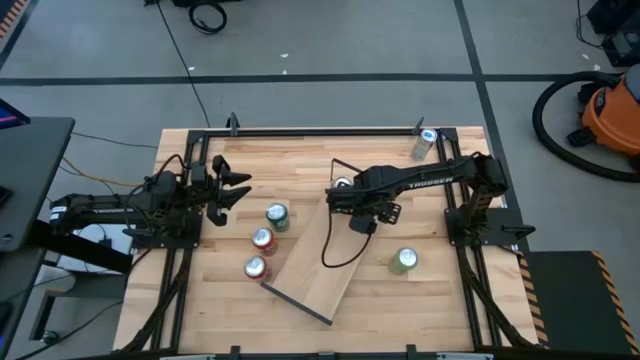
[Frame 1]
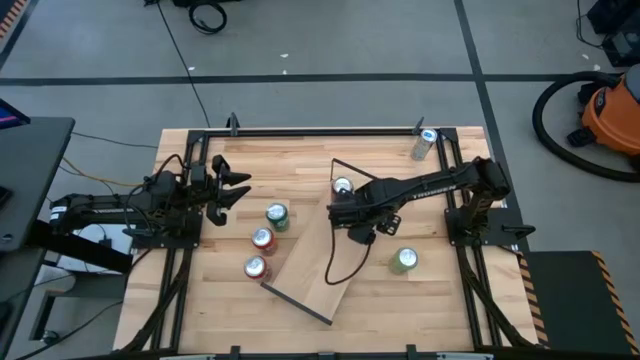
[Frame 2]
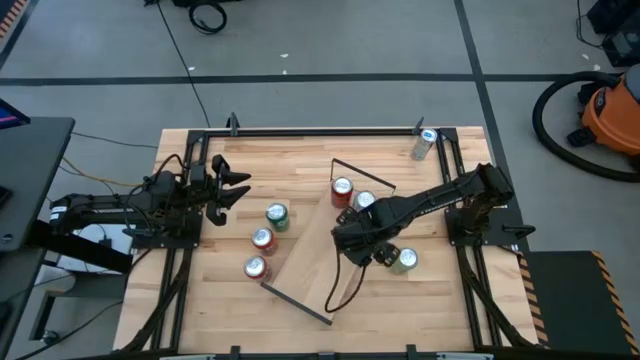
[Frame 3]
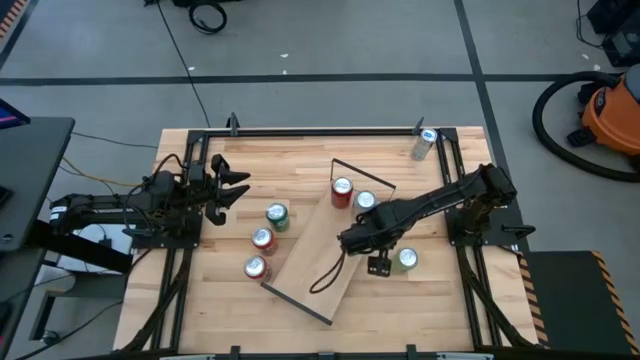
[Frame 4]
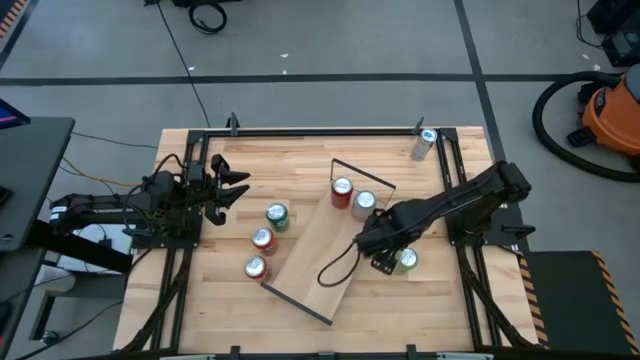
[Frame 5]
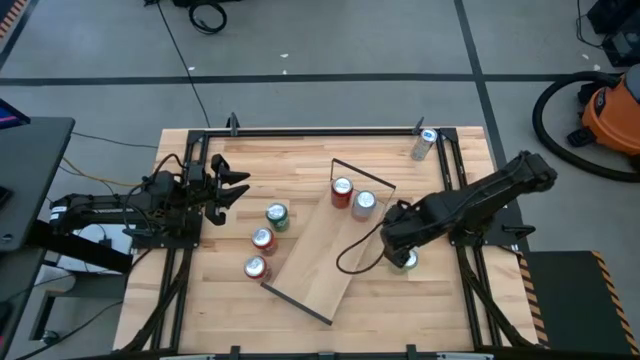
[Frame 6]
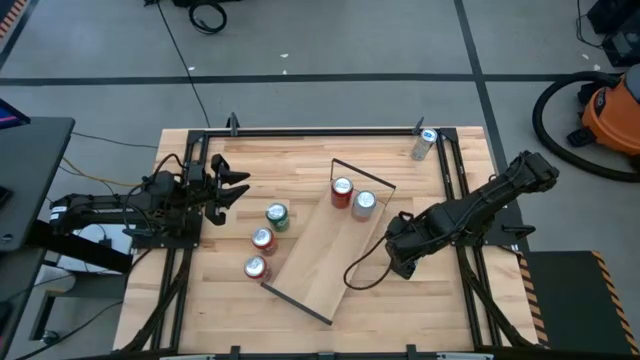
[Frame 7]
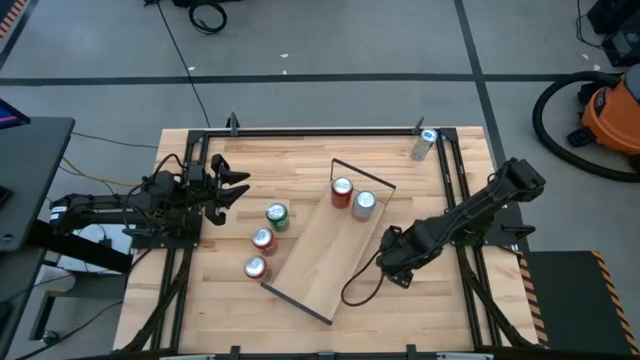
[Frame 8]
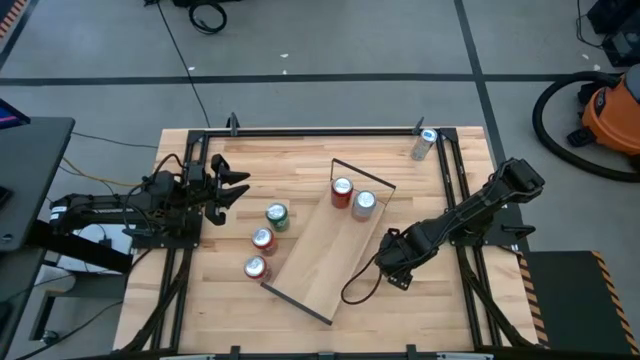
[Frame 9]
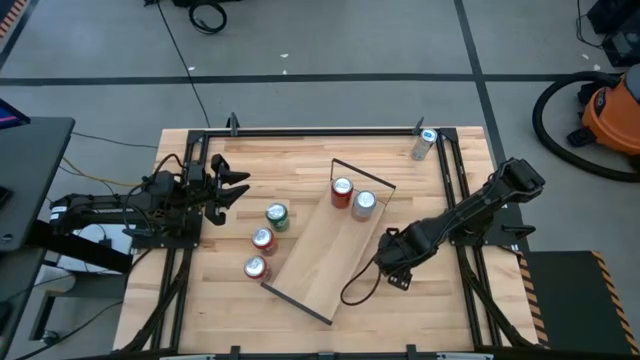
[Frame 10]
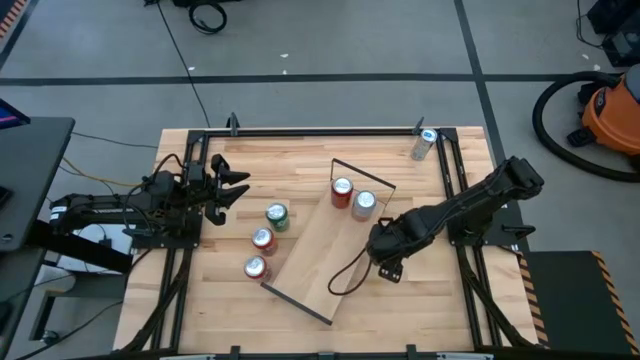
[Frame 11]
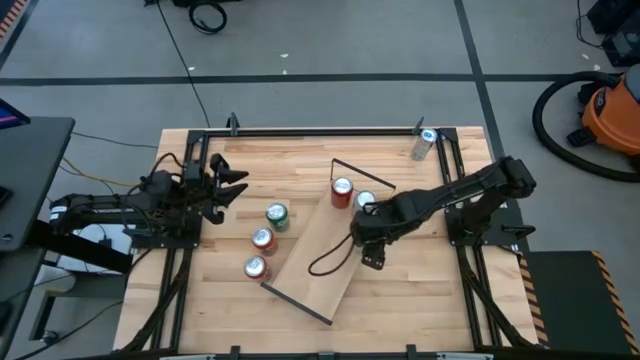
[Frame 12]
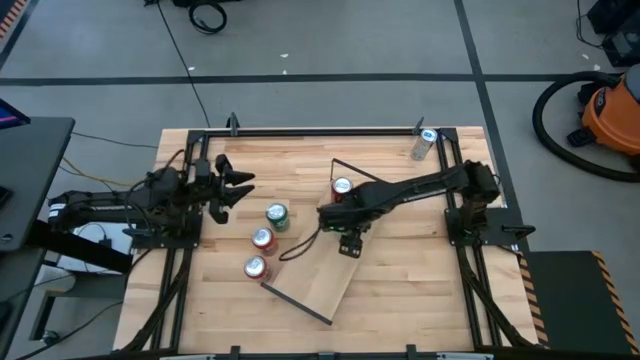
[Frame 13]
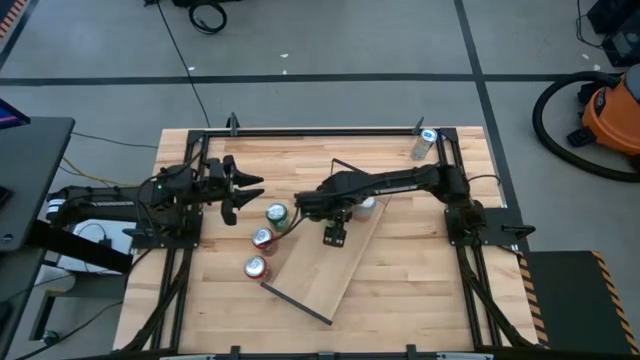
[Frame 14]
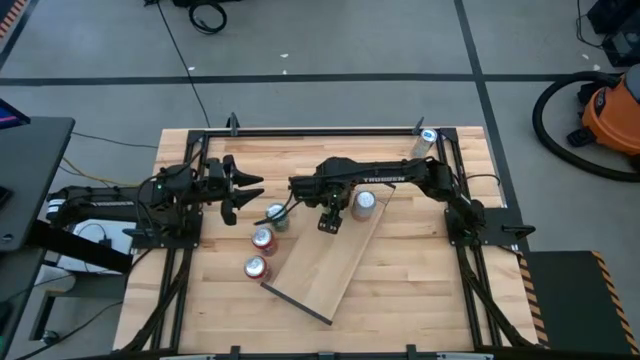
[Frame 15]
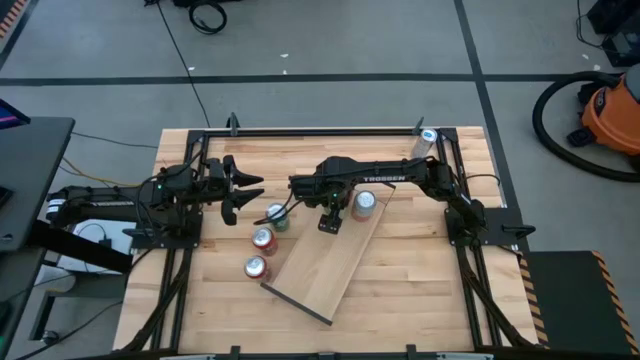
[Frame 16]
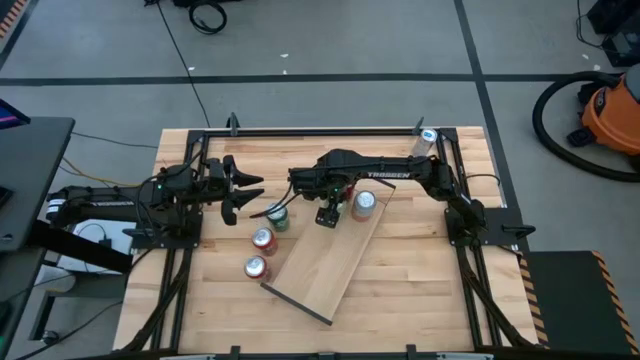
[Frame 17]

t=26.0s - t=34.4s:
Task: Place canned beverage on shelf
Put the light green soda can on the shelf

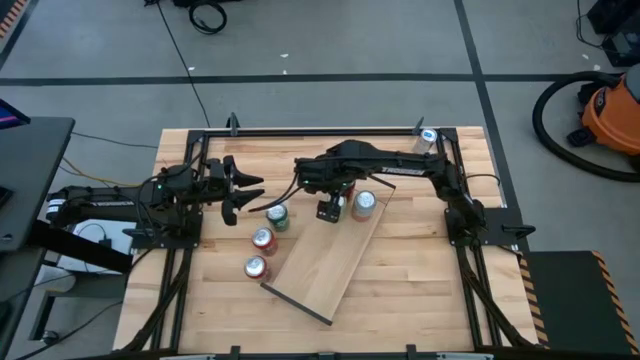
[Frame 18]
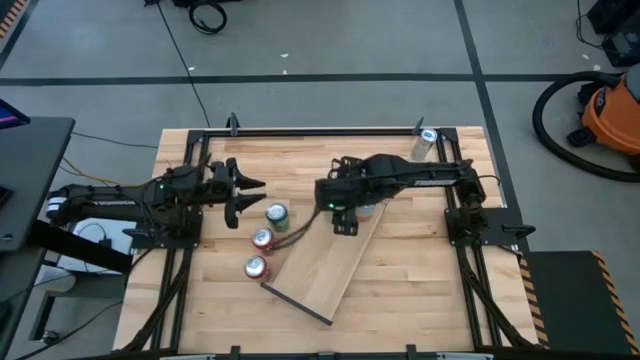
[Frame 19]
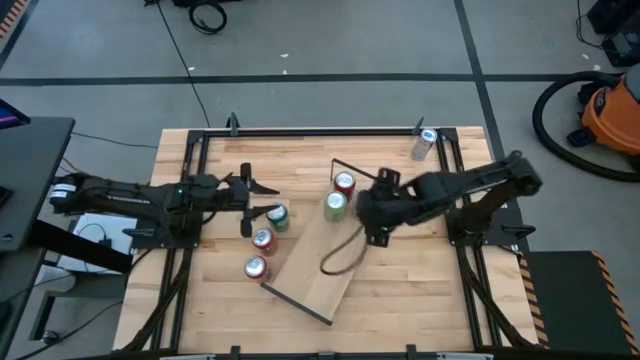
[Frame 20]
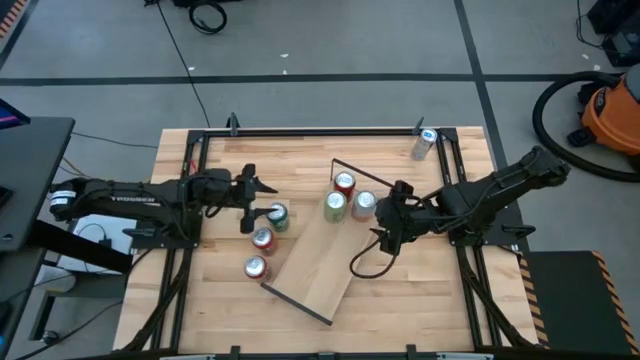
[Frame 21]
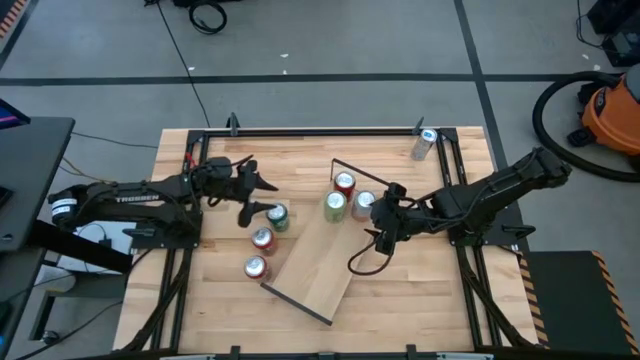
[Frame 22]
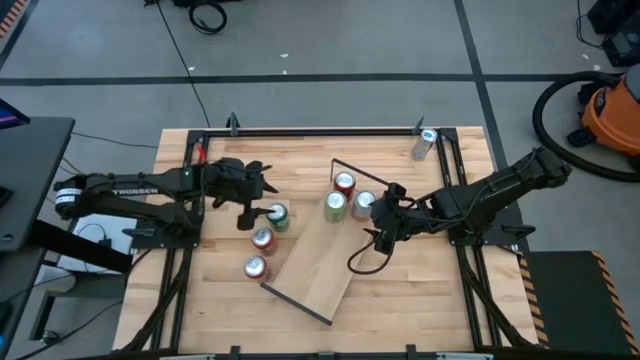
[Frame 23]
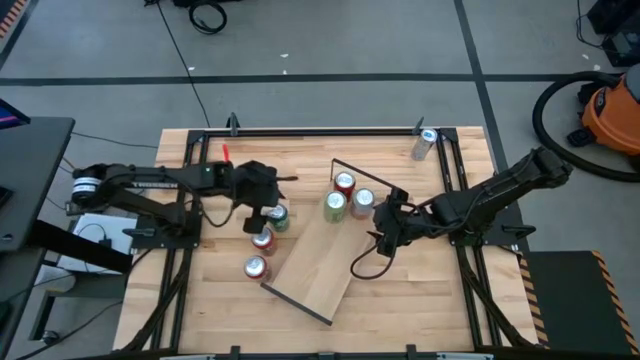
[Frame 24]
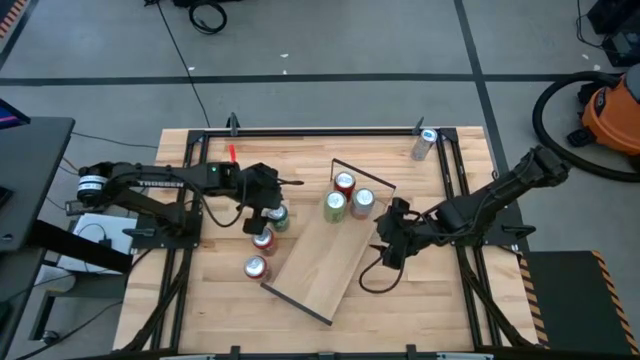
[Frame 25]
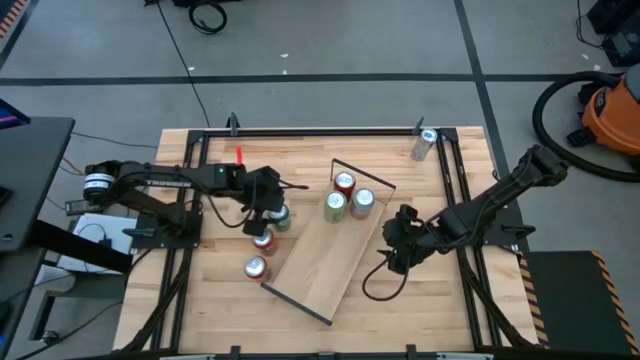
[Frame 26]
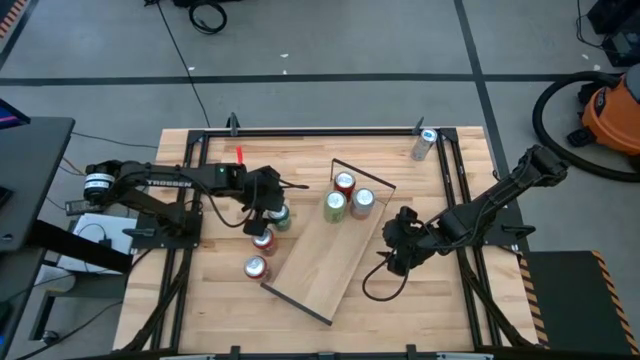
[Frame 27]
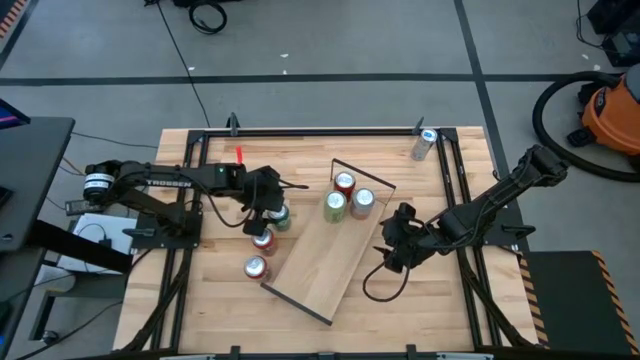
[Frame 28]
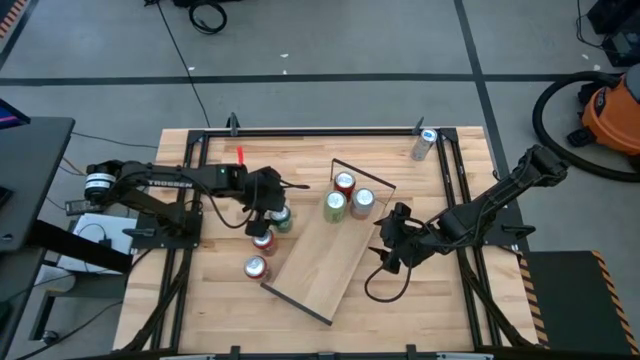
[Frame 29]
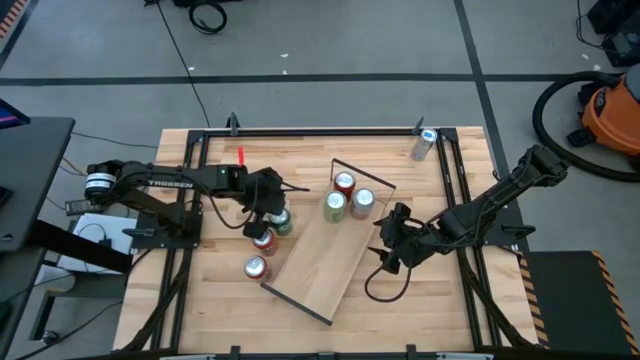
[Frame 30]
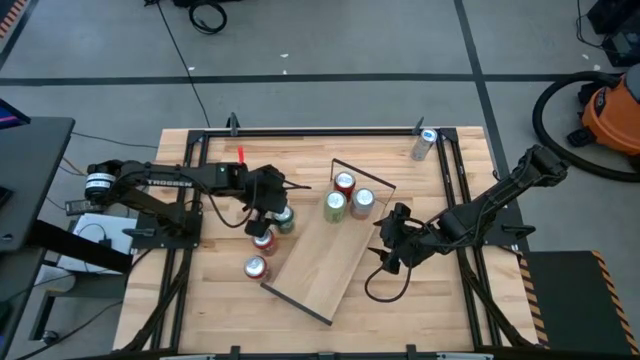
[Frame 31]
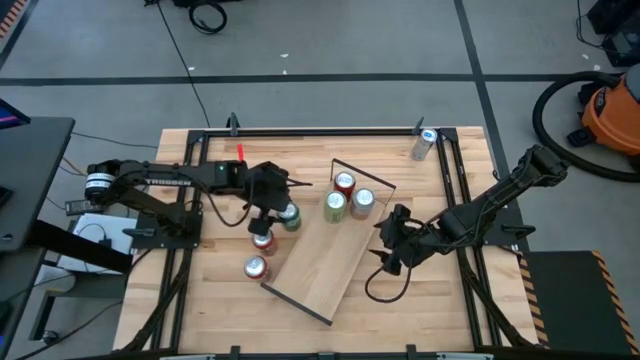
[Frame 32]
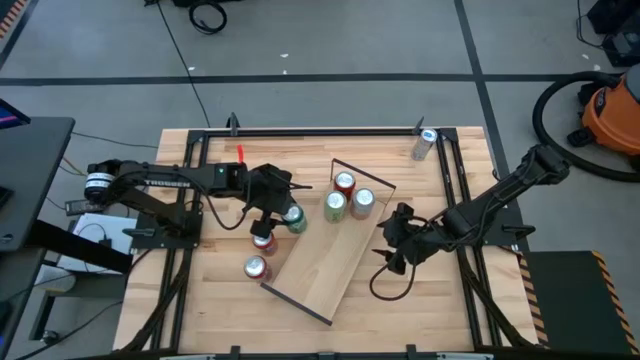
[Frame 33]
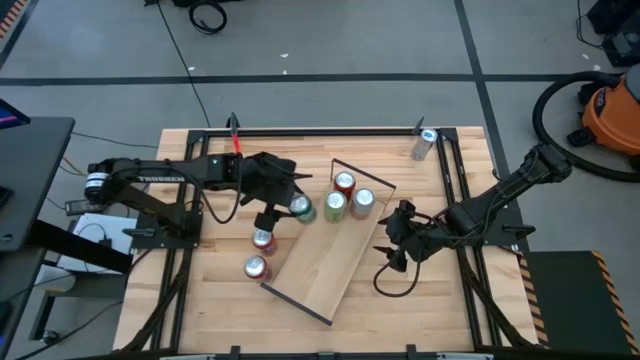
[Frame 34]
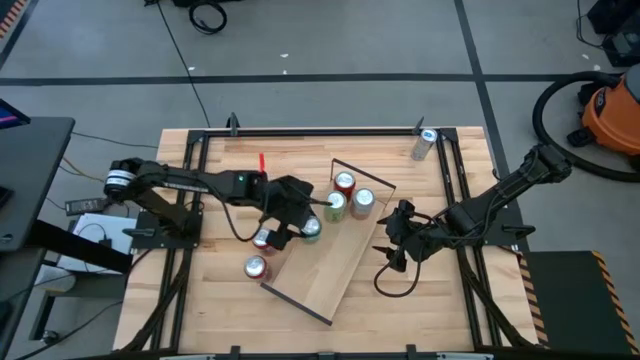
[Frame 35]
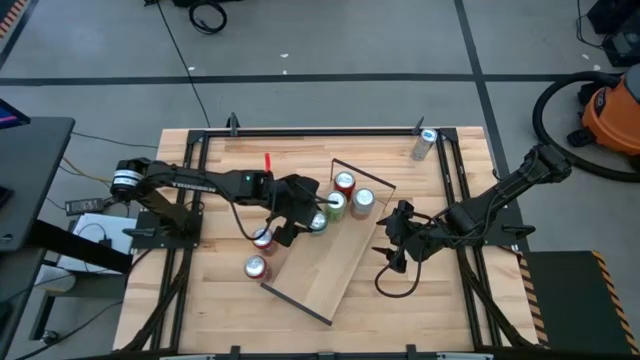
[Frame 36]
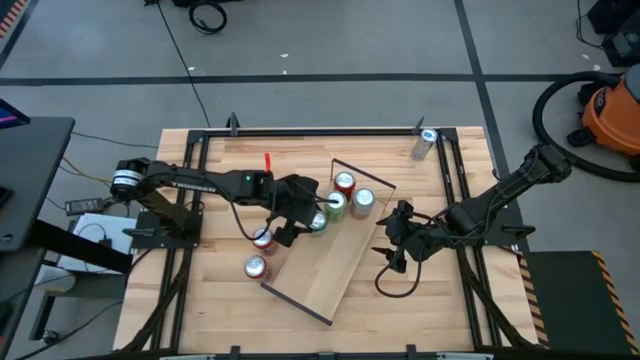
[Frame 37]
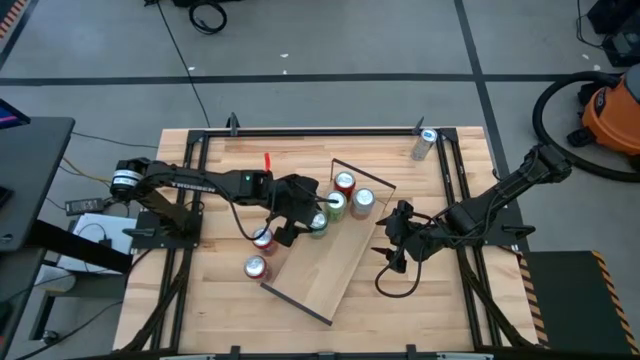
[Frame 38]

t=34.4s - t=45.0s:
Put the green soda can on the shelf

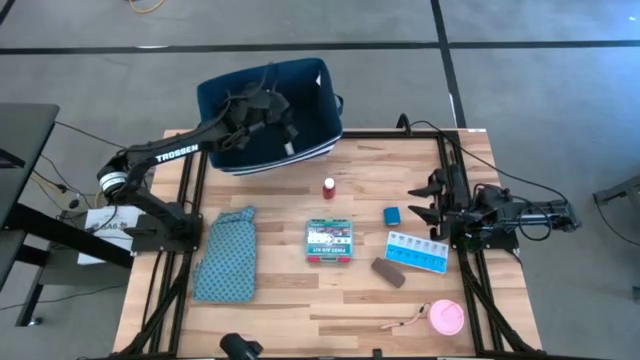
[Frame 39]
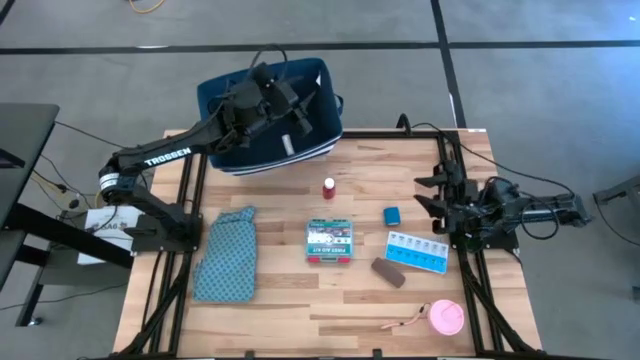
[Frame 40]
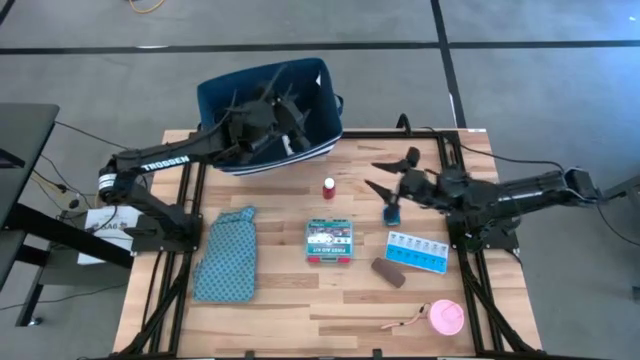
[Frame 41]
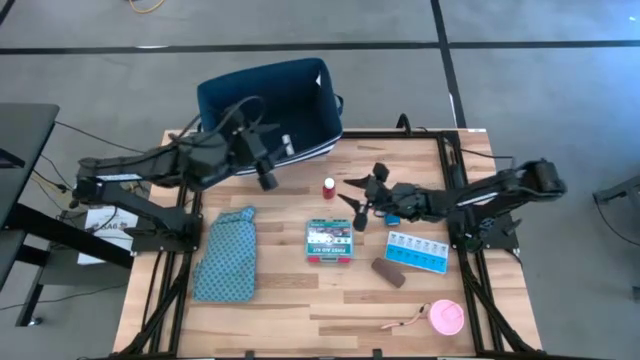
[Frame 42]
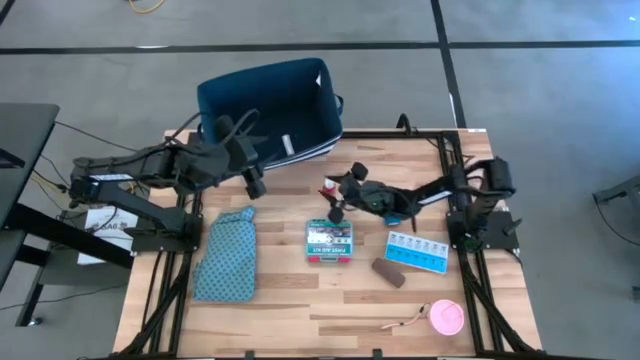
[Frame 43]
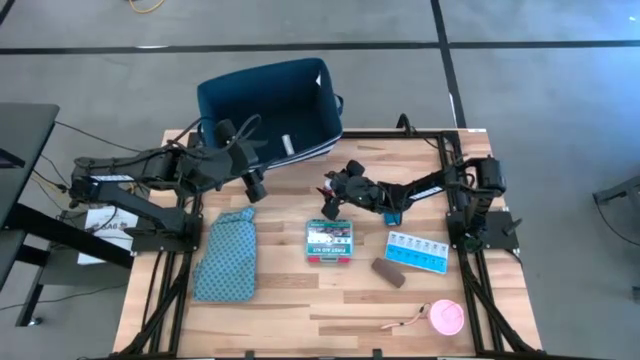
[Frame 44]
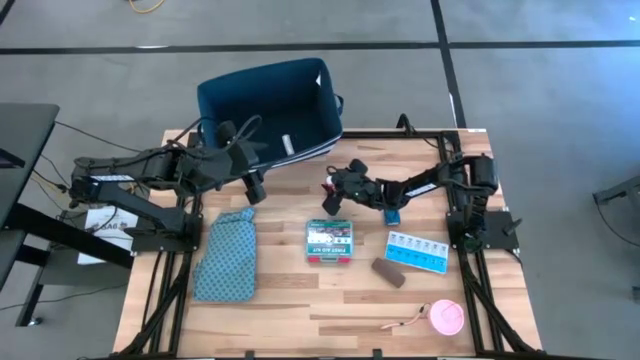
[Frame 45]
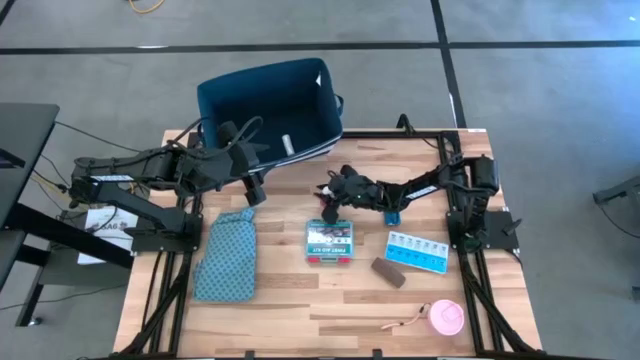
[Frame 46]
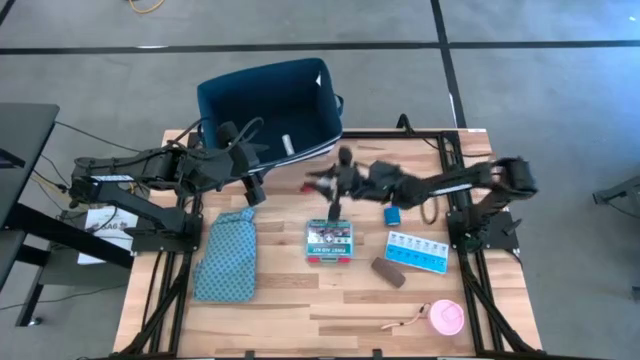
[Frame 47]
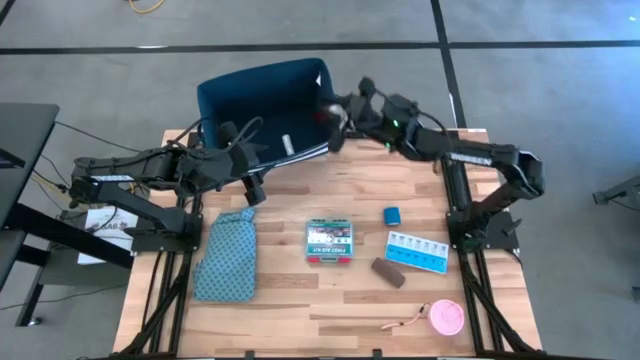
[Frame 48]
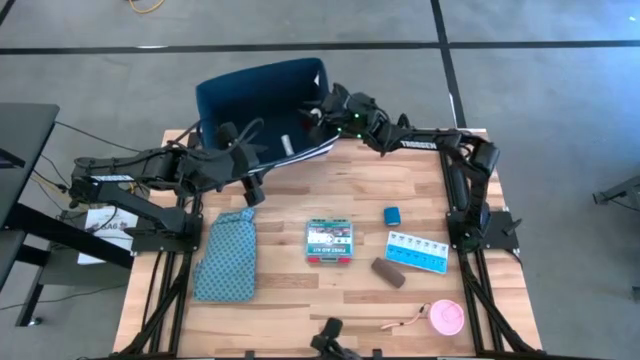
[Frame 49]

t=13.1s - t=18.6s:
Task: Pick & place medical supplies in basket/bin
Put the medicine bottle into the blue bin
